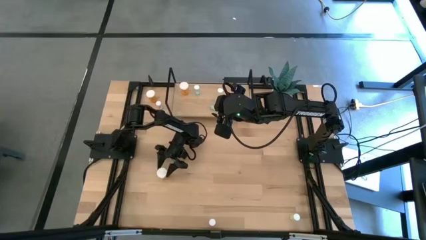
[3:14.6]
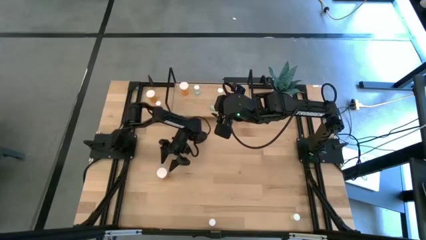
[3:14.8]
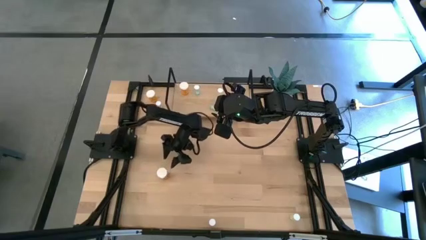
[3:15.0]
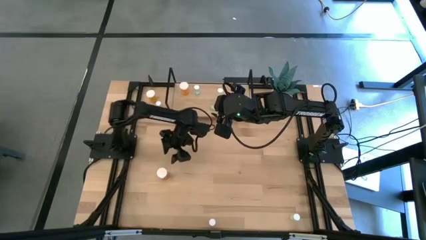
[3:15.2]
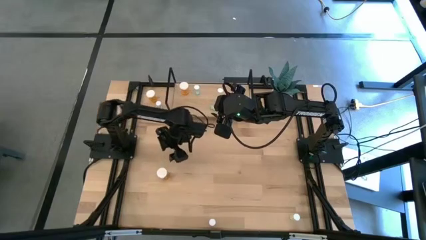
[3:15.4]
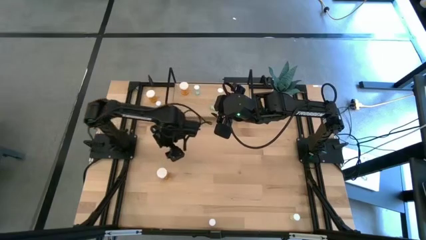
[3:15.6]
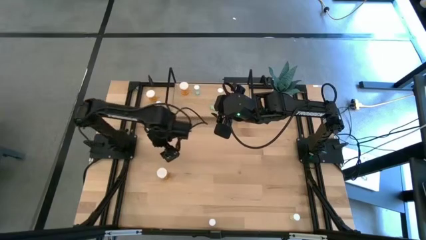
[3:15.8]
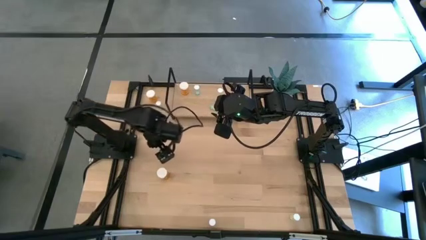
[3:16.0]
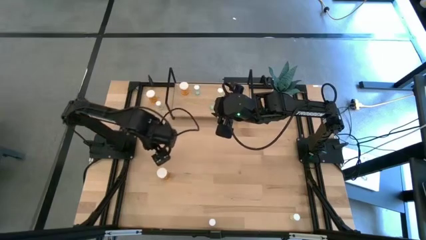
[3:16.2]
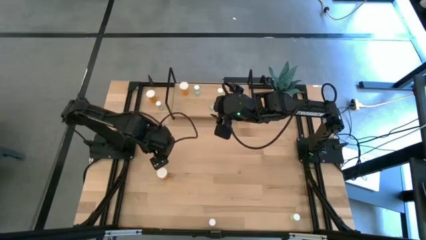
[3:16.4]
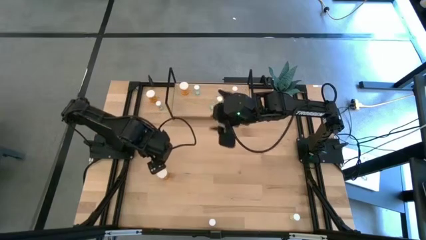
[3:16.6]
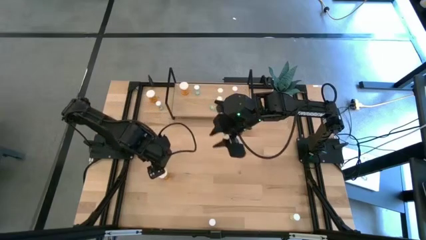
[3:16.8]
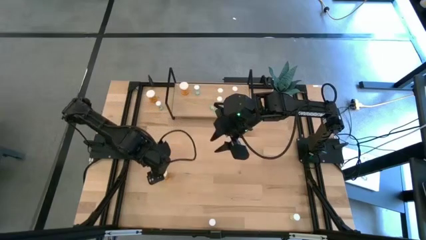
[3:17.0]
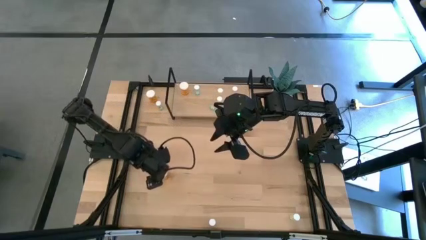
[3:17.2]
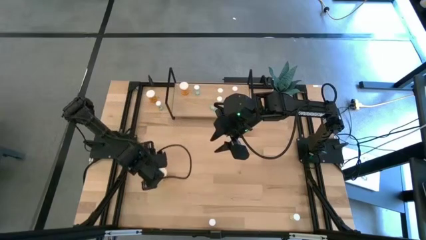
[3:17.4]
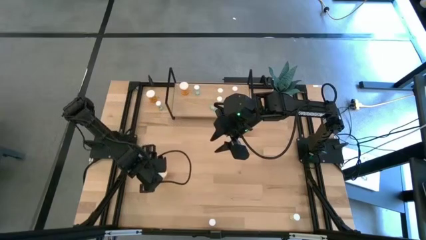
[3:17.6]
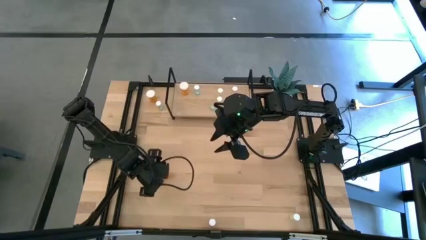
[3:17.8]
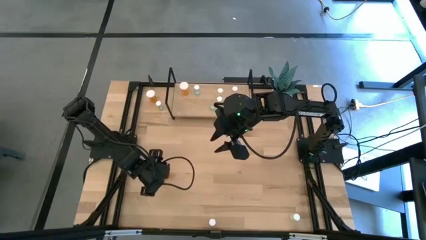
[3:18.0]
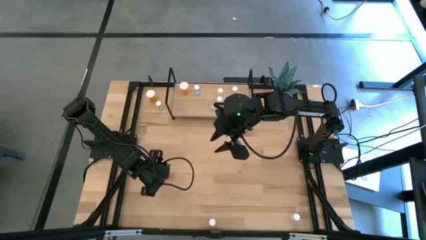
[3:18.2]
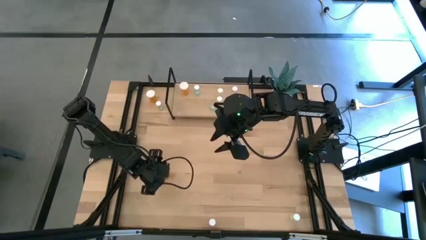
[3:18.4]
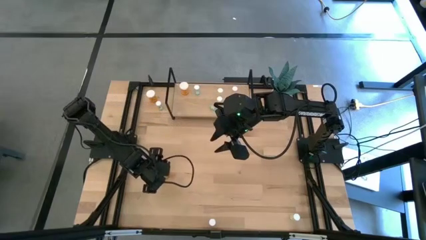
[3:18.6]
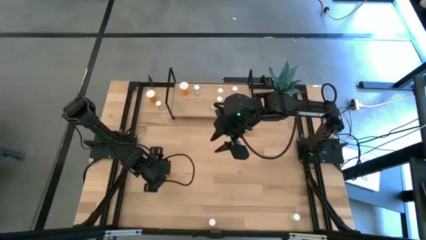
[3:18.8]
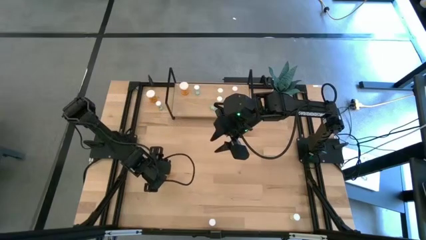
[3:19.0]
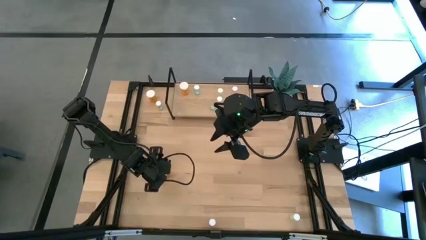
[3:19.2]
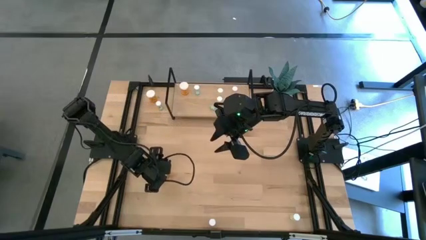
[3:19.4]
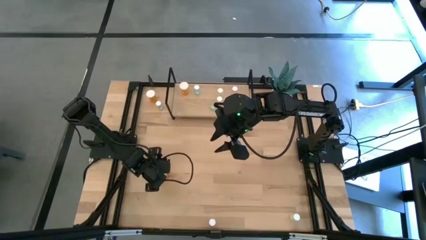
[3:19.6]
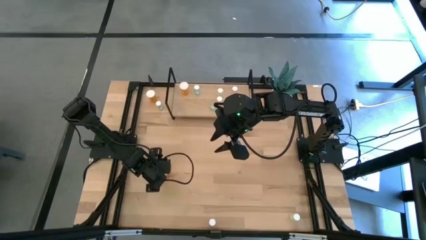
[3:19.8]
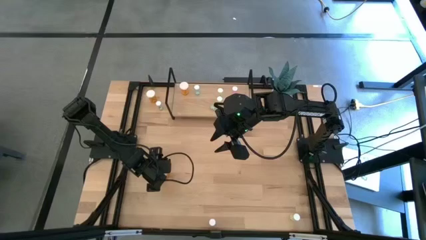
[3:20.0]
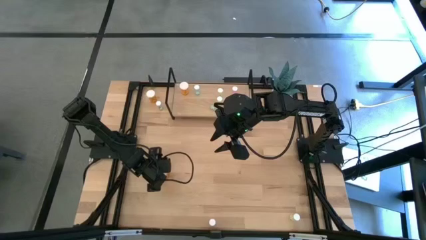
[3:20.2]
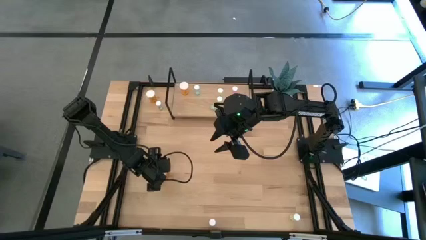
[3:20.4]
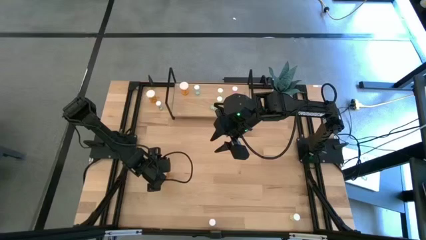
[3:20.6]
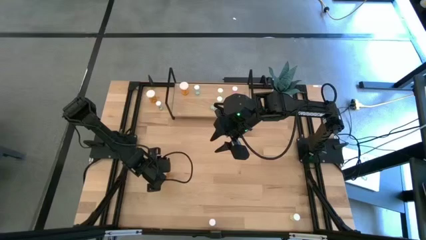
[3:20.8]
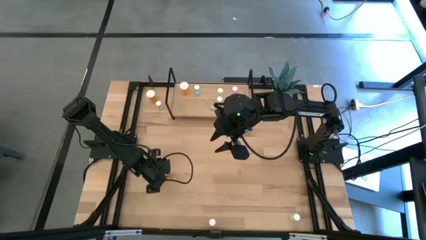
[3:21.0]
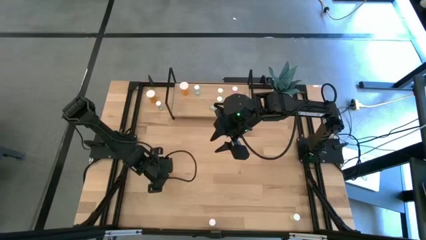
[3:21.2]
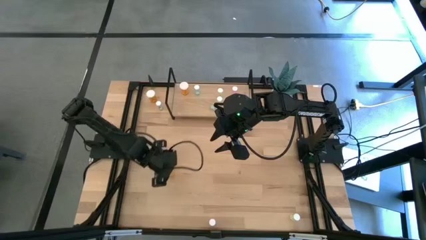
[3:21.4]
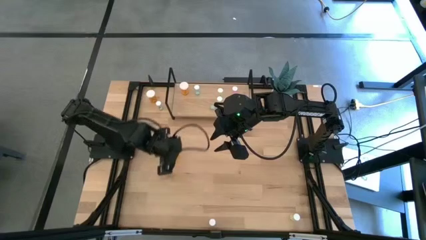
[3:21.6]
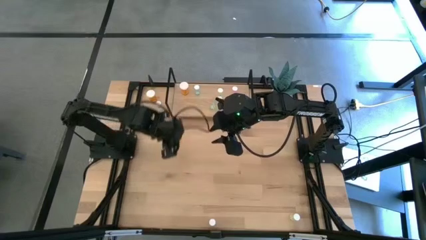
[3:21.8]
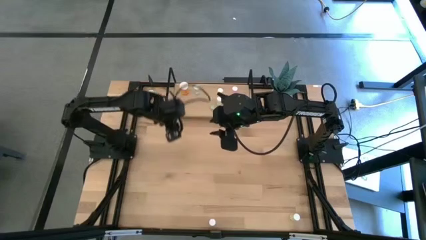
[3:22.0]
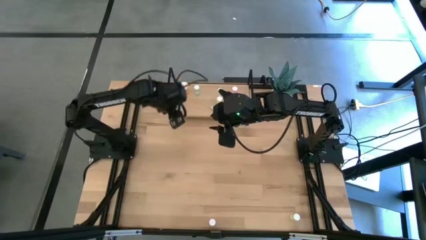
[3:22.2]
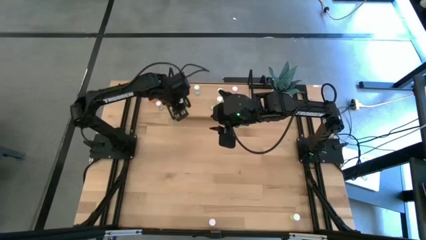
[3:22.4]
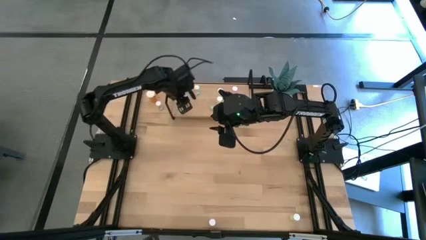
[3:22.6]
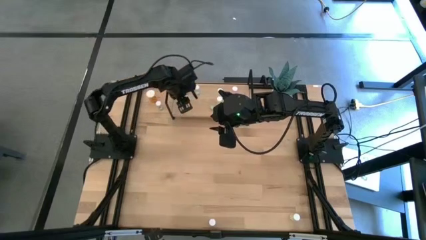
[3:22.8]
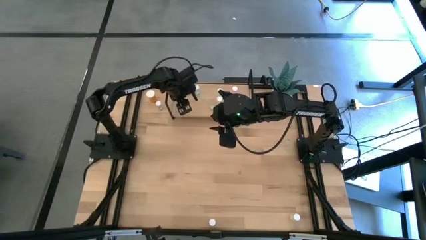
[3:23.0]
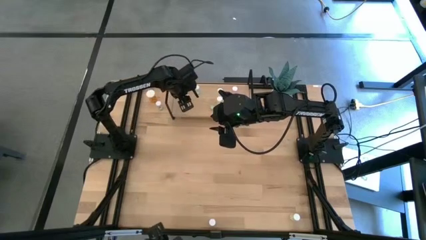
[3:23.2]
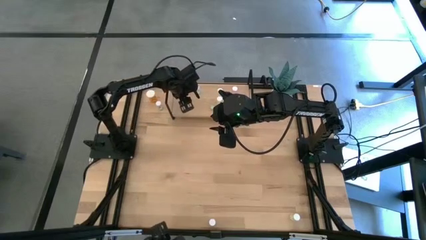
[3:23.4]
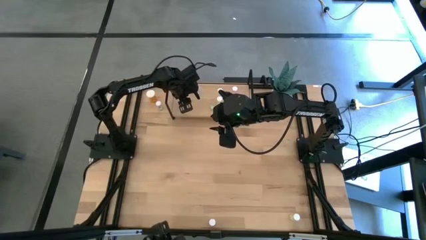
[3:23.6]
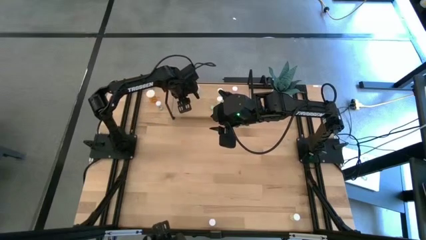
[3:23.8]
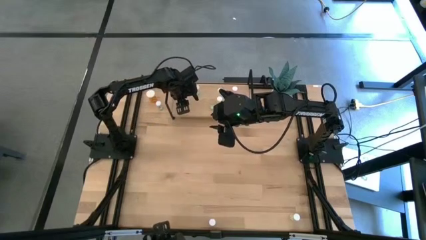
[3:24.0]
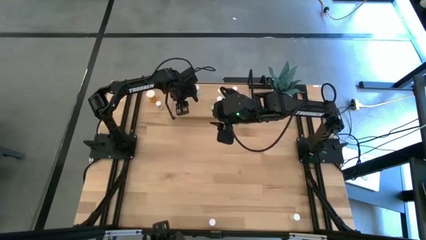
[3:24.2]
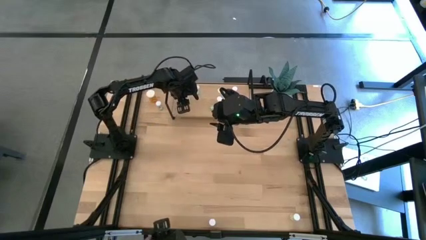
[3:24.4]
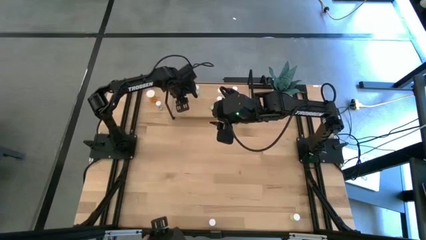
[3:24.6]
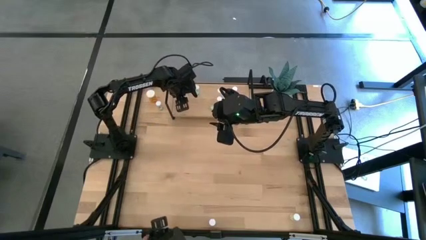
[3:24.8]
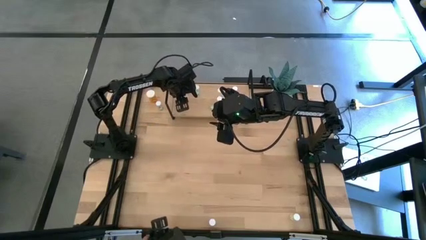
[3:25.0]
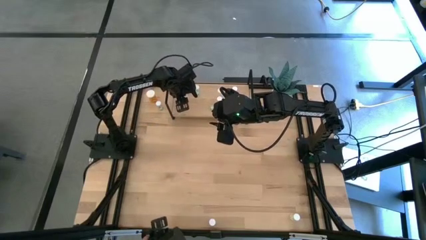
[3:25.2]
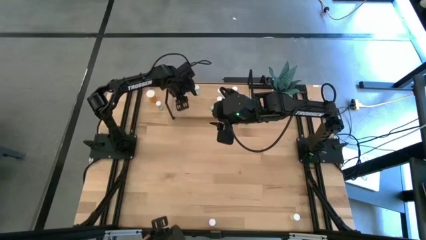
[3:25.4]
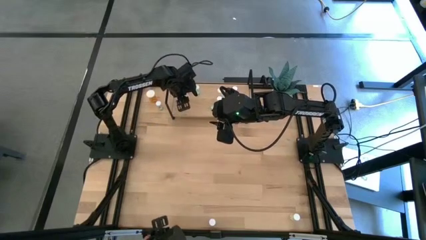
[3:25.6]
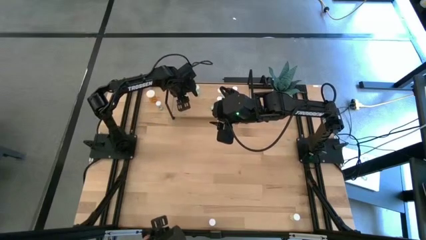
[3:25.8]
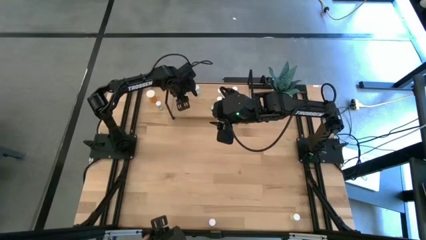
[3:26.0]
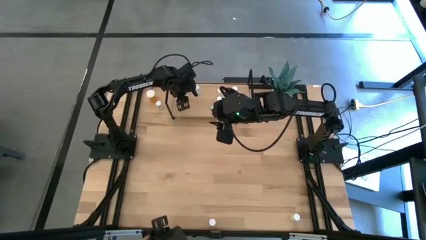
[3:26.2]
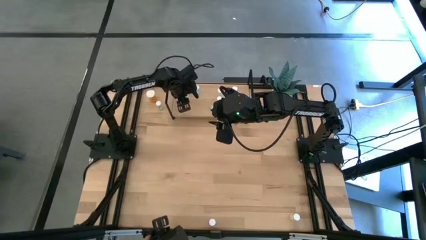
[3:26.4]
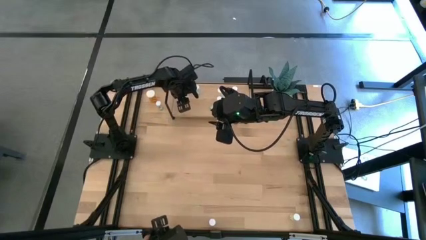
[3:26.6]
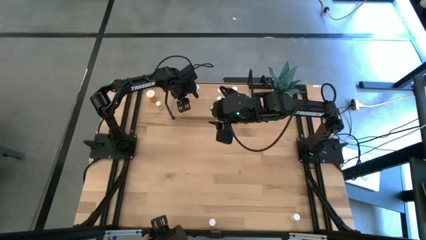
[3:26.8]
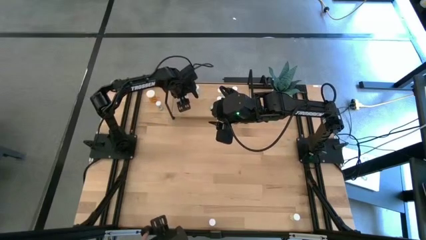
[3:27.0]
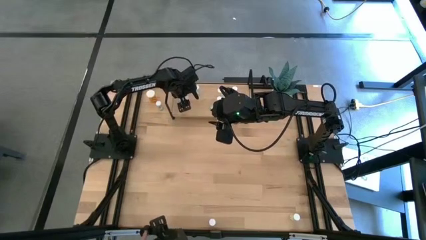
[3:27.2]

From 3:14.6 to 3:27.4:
Task: Pick and place medicine bottles onto shelf by color
Put the bottom orange pill bottle on the shelf aligned with the other orange pill bottle
